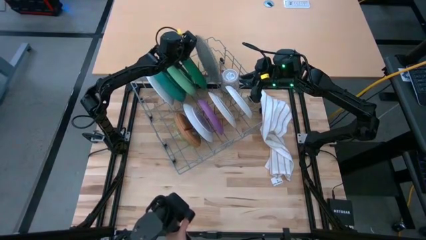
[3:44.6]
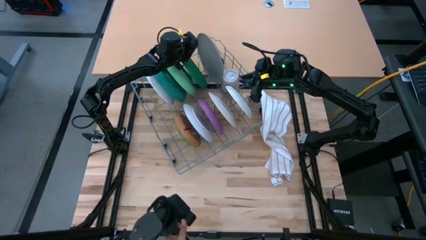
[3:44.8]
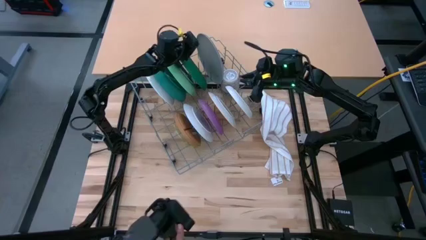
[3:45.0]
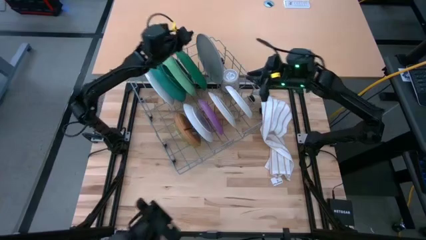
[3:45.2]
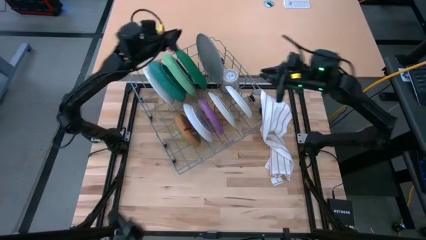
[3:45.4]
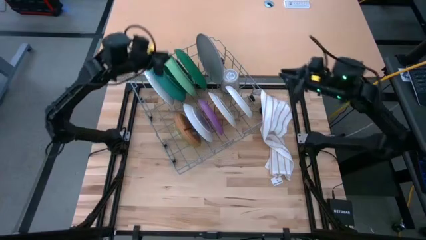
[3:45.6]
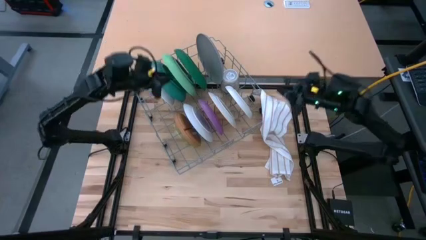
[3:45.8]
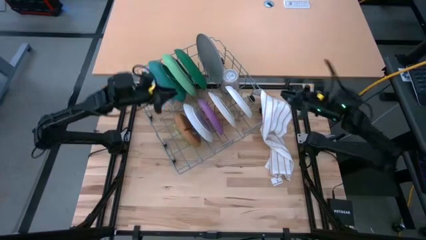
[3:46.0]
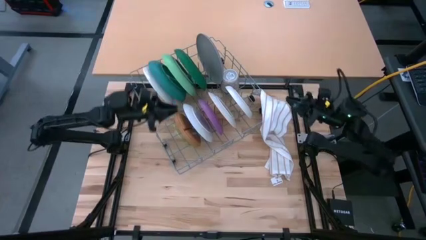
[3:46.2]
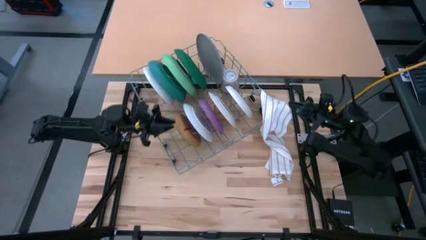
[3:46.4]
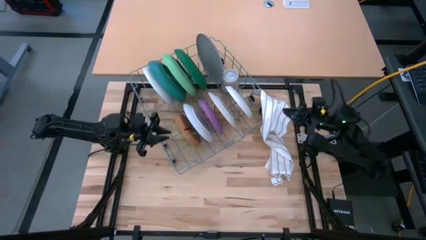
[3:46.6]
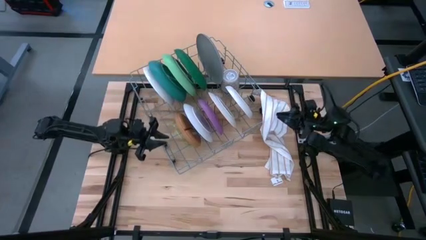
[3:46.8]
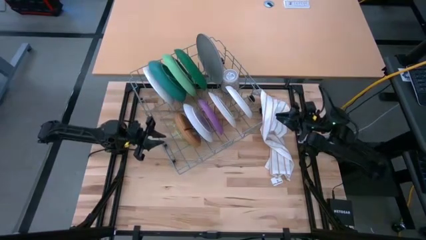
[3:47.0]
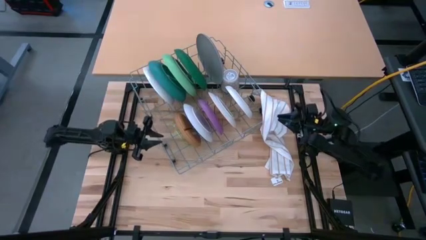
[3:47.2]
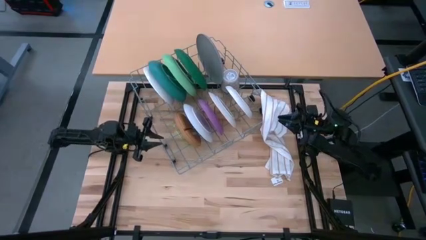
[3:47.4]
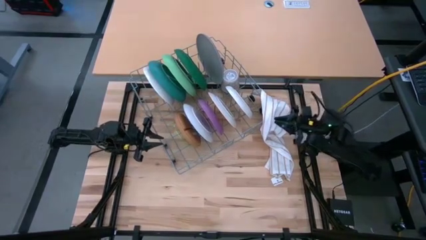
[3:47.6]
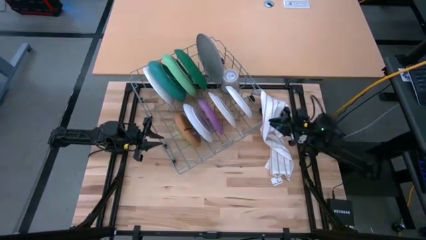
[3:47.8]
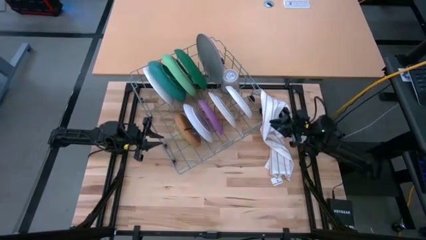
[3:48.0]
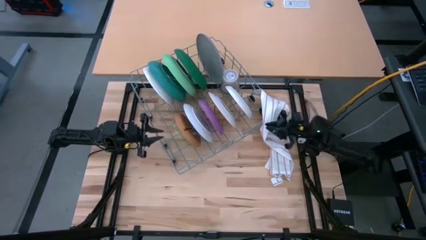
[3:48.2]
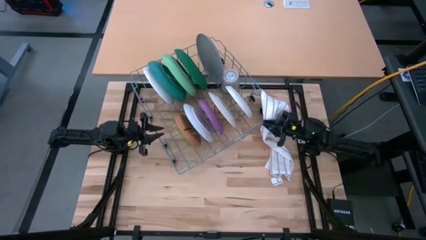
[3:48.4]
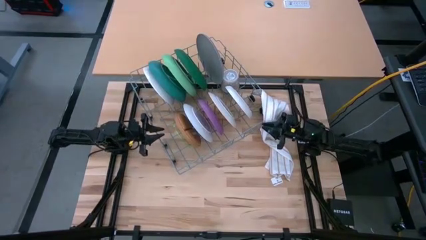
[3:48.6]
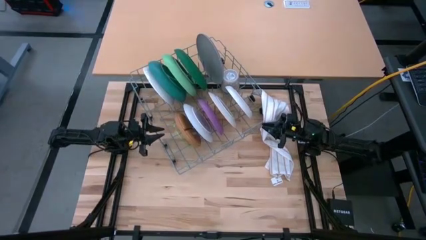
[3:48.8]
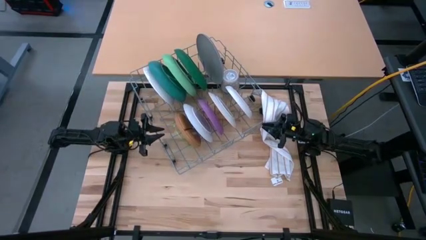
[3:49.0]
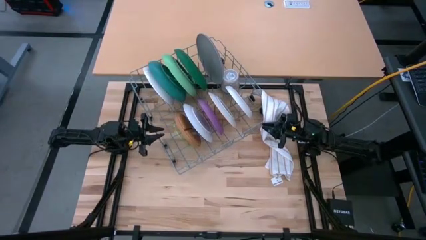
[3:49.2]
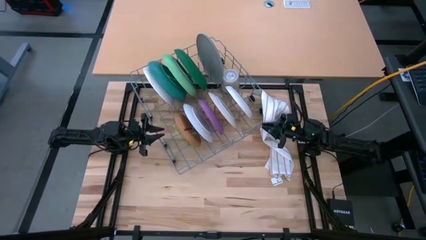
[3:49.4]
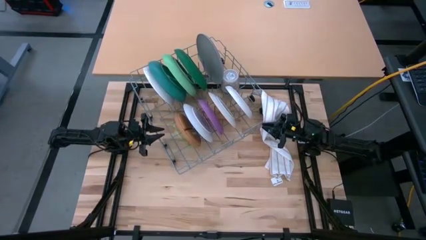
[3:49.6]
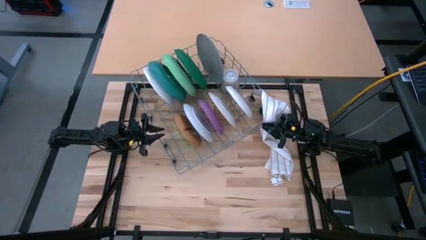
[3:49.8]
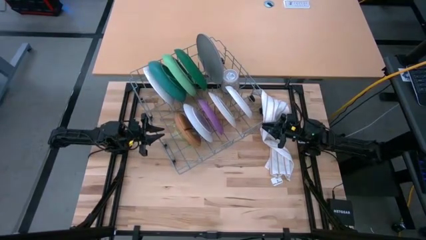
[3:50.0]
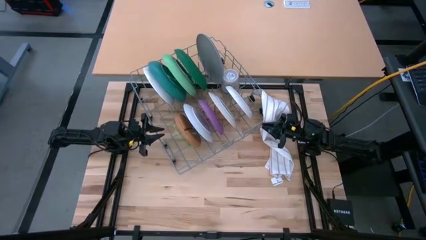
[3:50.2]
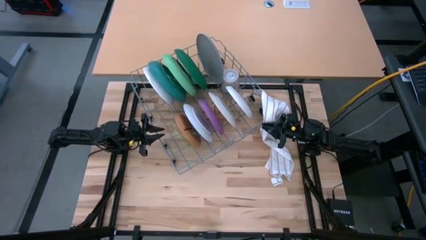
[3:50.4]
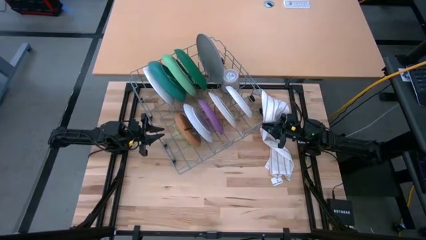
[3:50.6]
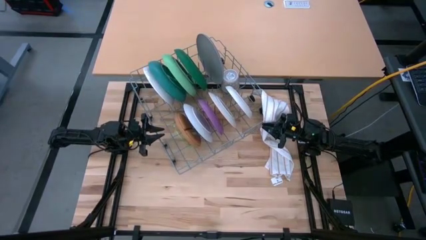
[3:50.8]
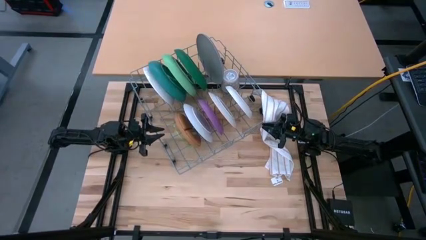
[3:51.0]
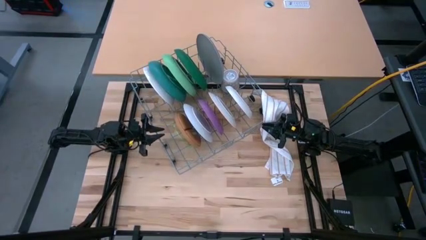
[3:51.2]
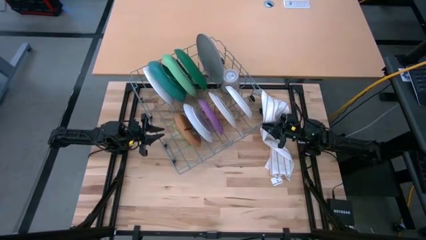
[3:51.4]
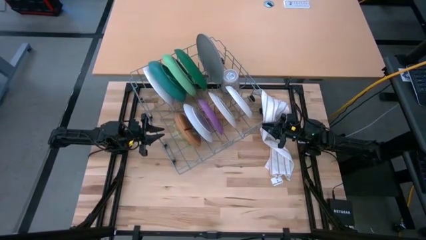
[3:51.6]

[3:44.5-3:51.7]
Task: Sort dishes
Return to Home Position

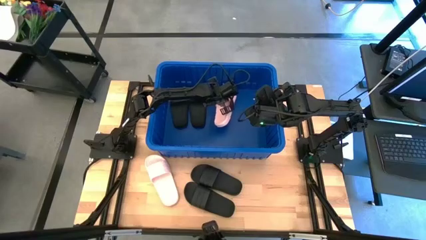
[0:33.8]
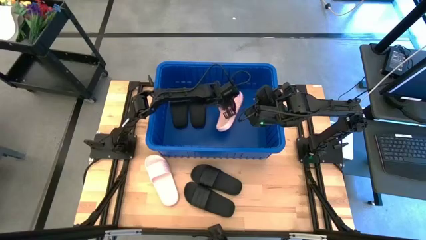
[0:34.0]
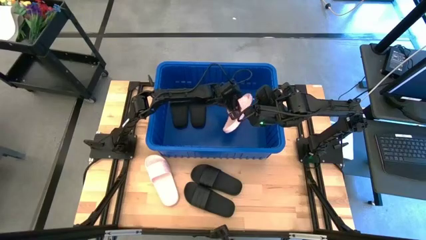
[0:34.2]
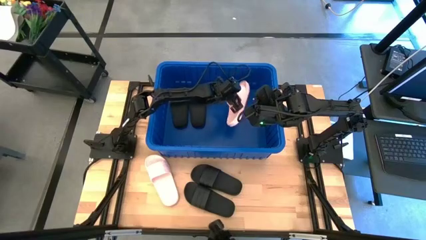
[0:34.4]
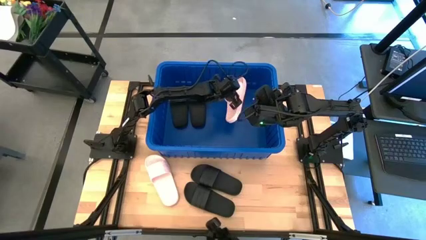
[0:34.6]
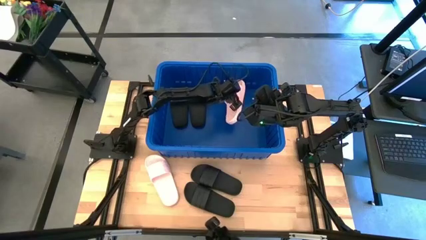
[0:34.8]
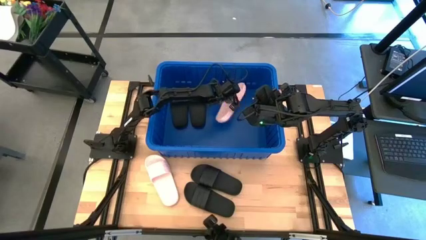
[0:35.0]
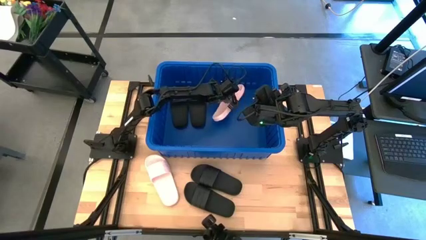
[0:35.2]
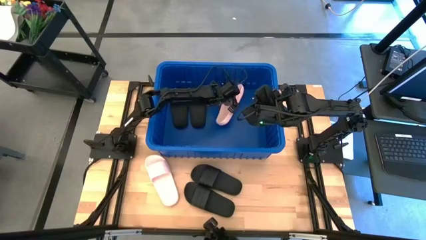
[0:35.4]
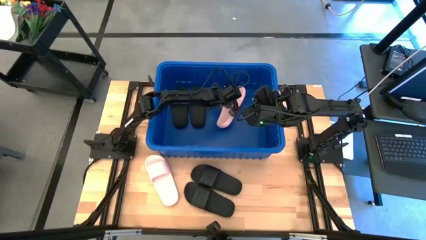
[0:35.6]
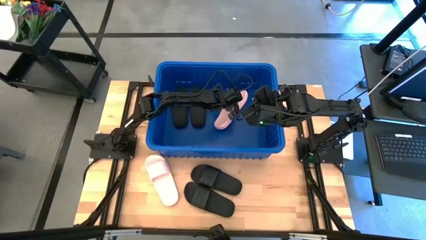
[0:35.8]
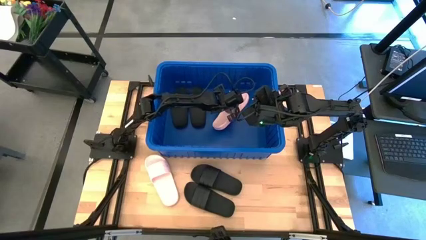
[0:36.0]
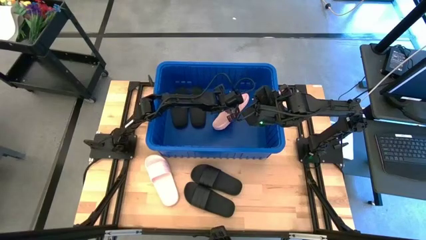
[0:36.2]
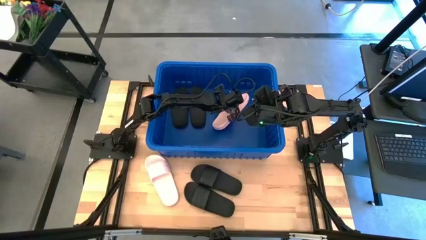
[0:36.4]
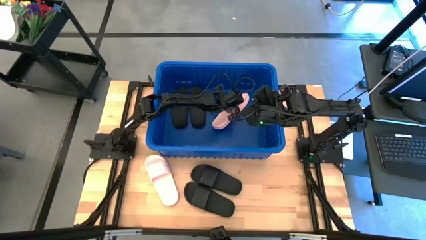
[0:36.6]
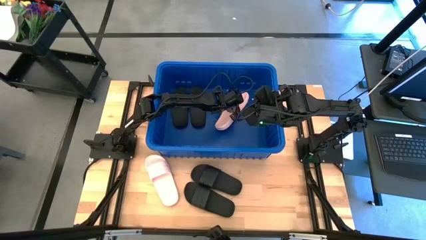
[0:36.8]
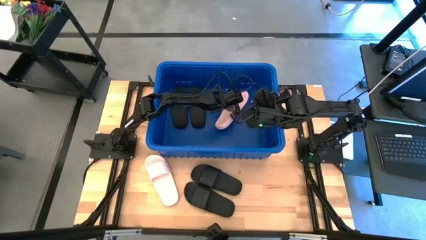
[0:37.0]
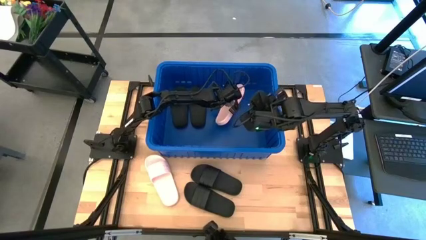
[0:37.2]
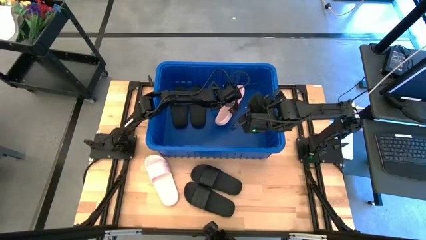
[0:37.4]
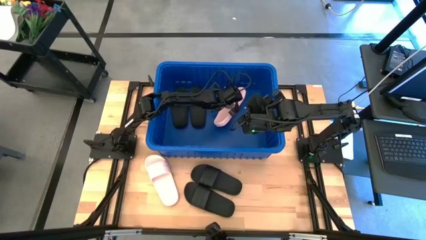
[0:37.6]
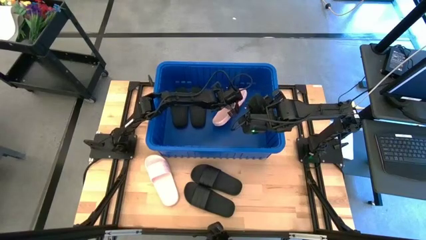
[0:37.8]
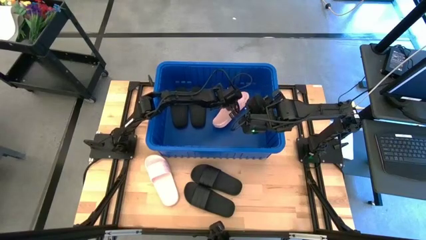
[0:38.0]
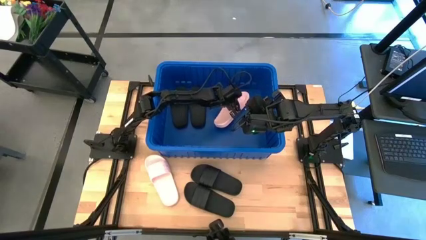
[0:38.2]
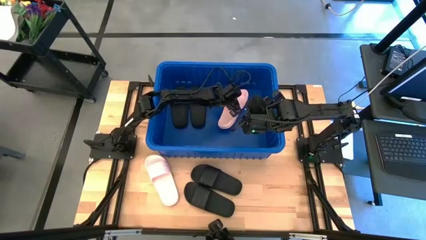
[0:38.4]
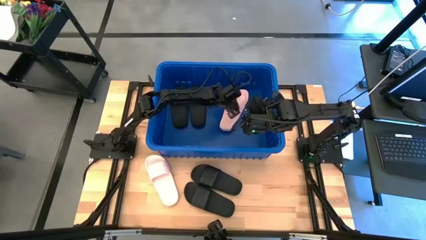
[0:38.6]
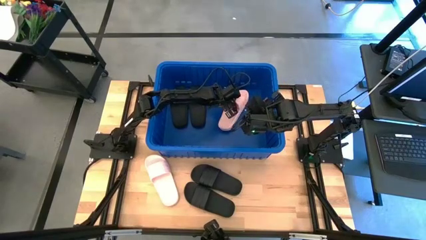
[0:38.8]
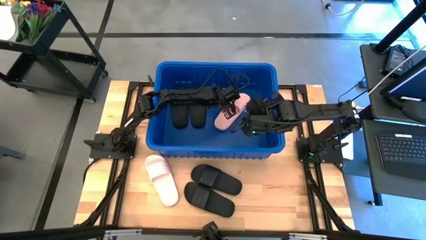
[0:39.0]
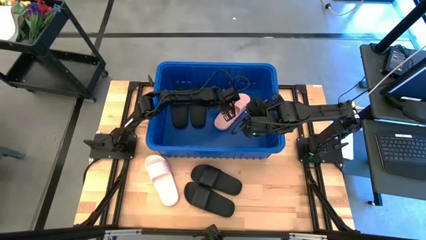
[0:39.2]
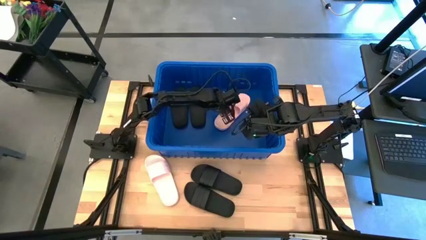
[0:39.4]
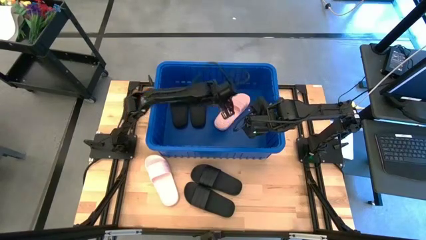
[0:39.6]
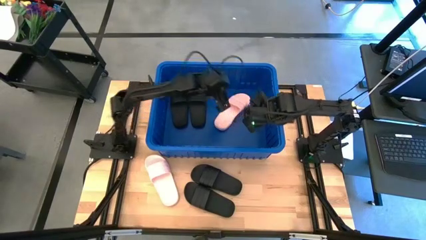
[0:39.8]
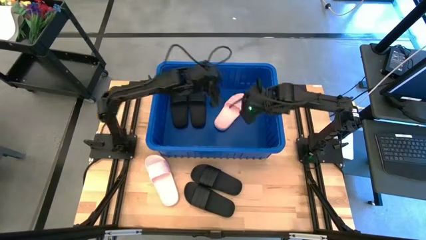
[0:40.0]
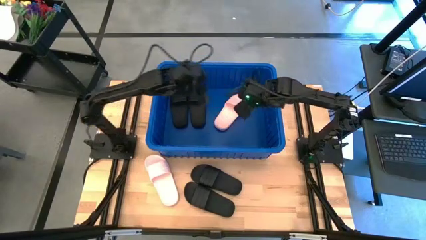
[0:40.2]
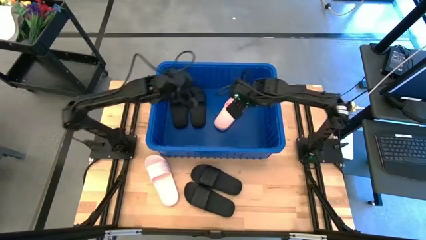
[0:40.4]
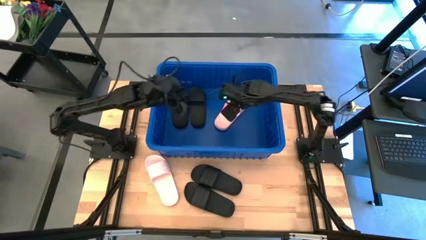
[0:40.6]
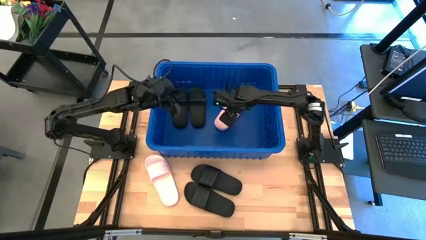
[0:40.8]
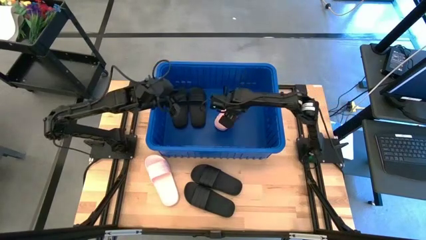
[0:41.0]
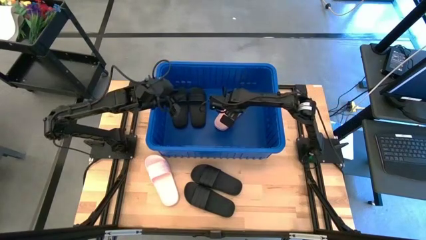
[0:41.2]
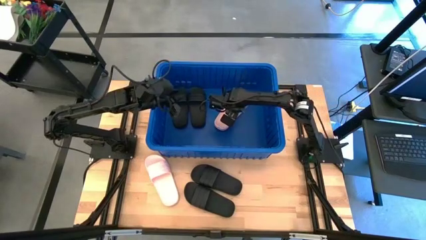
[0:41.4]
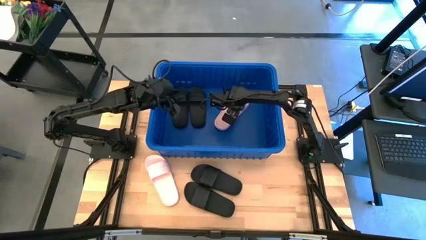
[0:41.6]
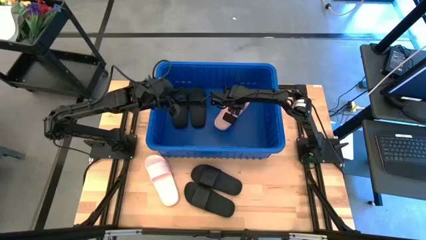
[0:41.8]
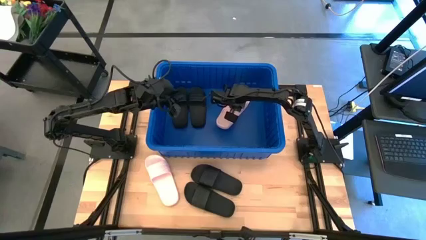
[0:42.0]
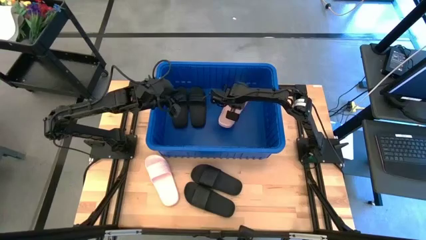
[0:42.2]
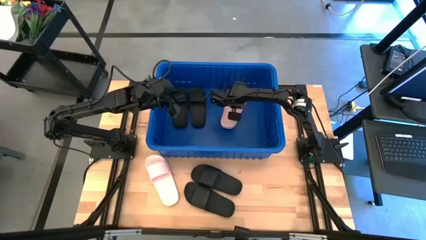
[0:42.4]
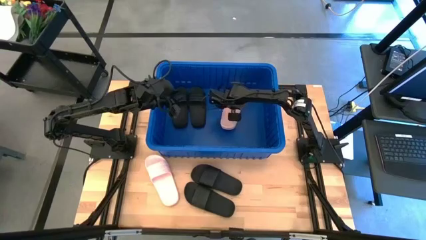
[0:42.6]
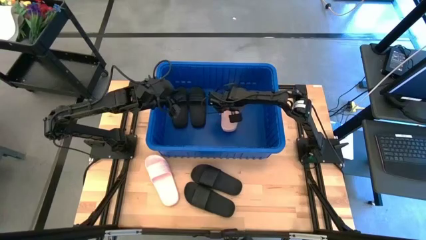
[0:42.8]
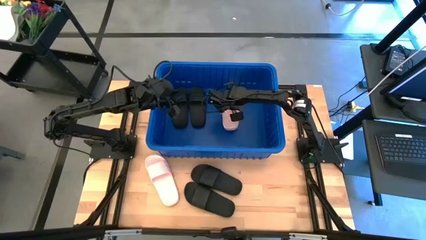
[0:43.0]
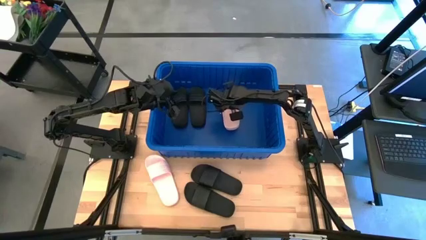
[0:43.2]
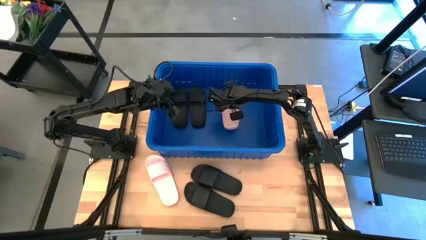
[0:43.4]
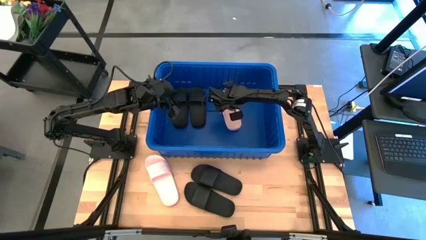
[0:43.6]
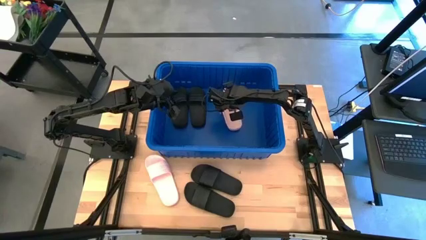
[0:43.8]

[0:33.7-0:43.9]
Task: Pick and place slides into bin
Put the pink slide into the blue bin
